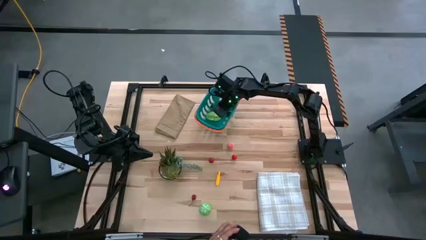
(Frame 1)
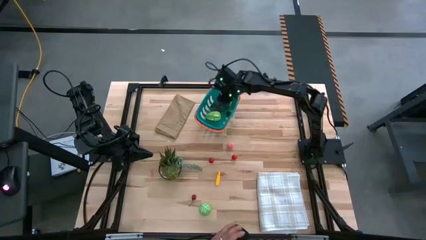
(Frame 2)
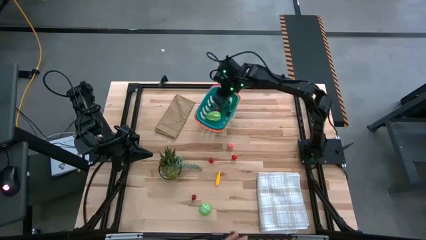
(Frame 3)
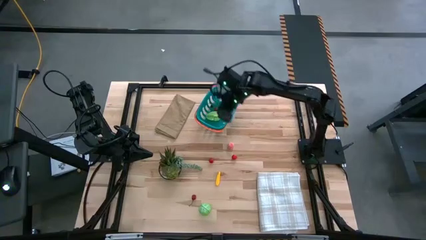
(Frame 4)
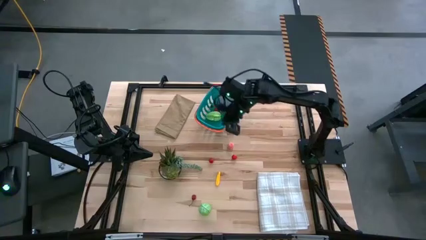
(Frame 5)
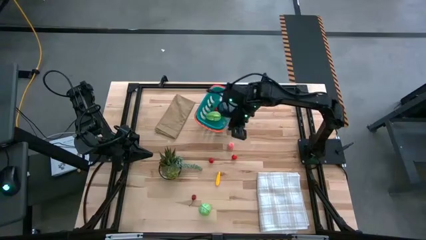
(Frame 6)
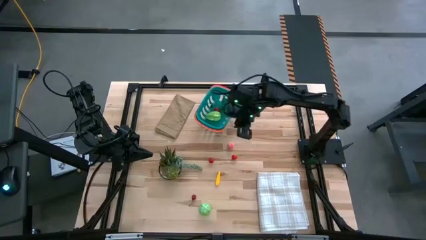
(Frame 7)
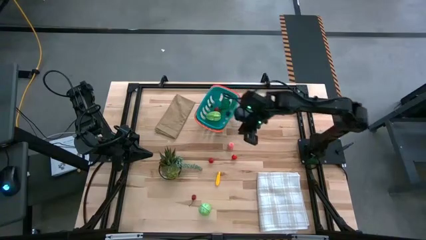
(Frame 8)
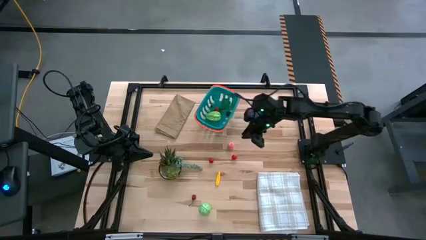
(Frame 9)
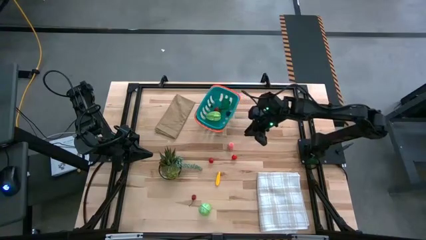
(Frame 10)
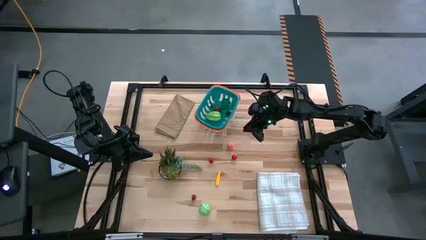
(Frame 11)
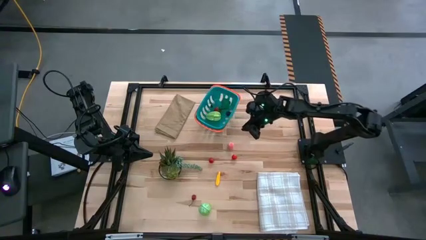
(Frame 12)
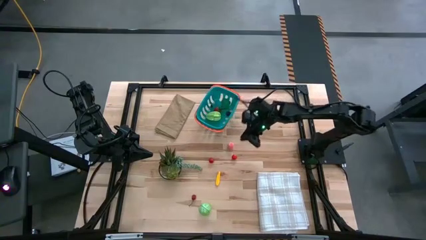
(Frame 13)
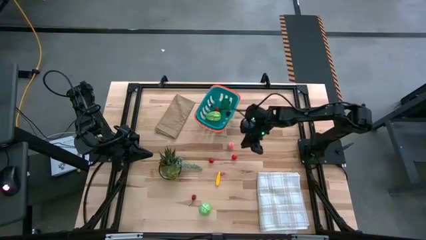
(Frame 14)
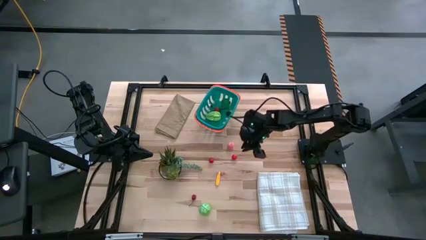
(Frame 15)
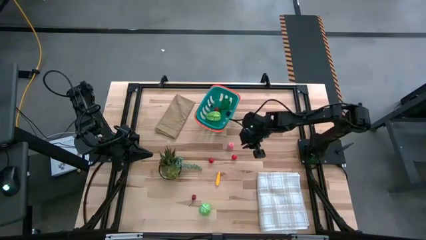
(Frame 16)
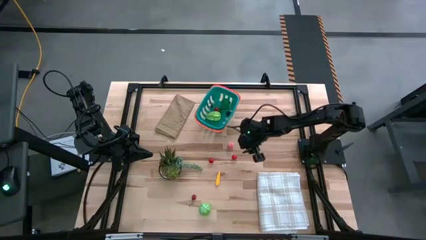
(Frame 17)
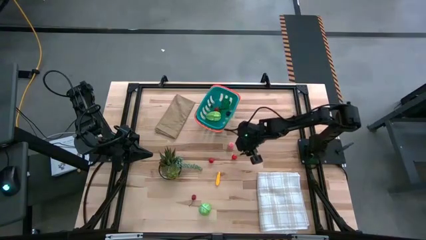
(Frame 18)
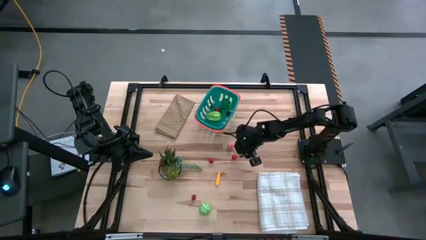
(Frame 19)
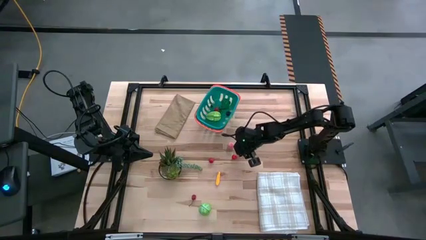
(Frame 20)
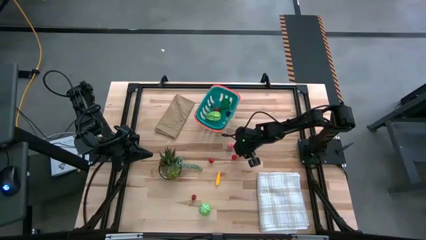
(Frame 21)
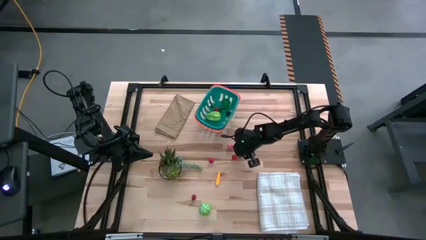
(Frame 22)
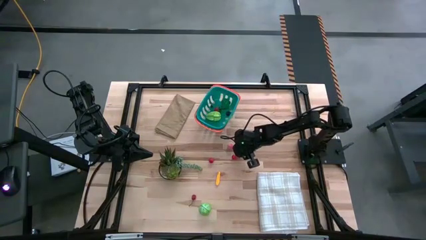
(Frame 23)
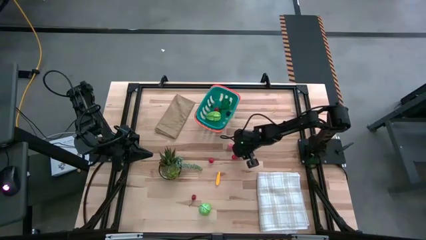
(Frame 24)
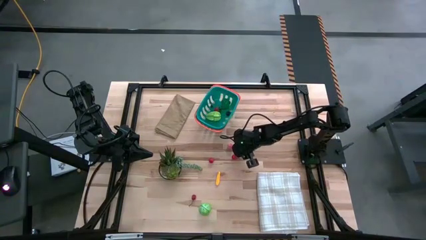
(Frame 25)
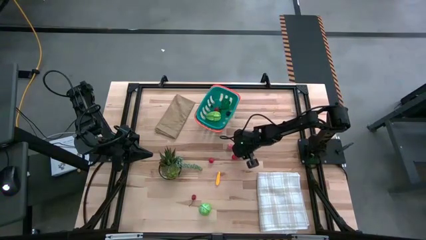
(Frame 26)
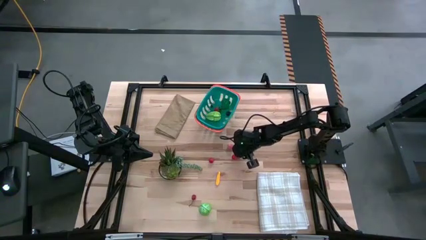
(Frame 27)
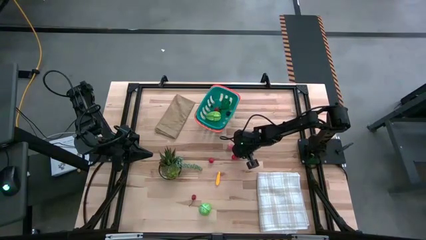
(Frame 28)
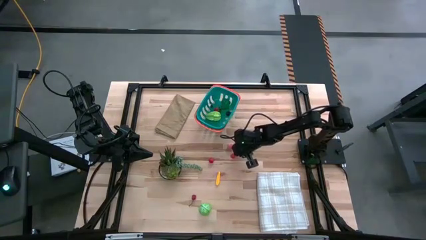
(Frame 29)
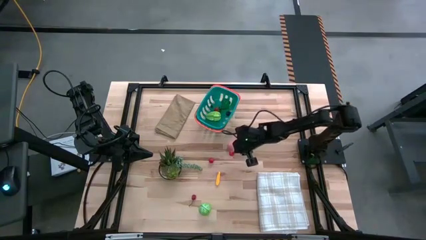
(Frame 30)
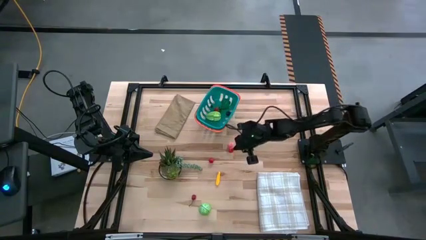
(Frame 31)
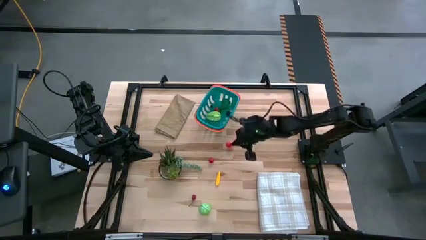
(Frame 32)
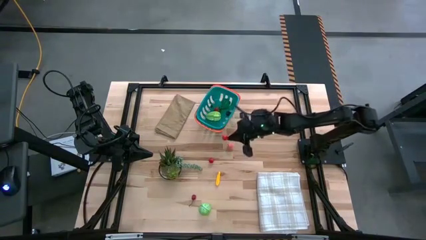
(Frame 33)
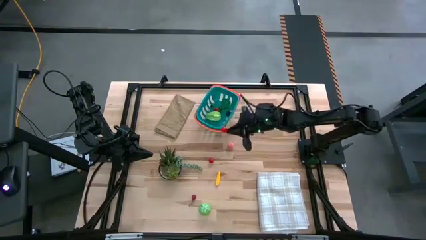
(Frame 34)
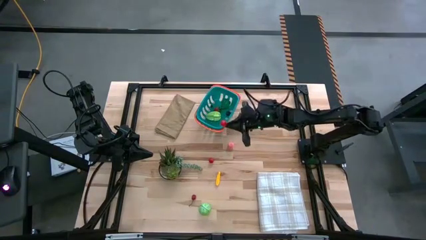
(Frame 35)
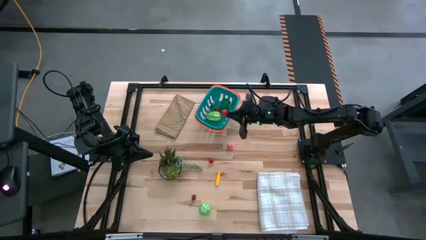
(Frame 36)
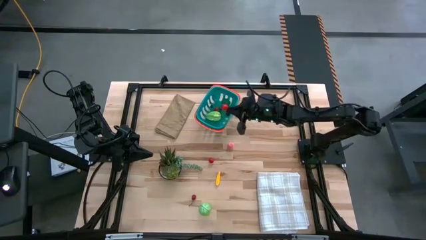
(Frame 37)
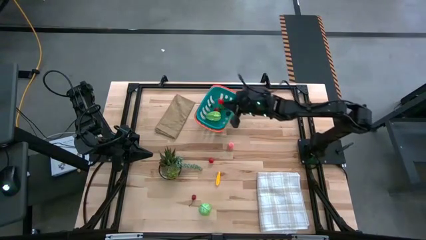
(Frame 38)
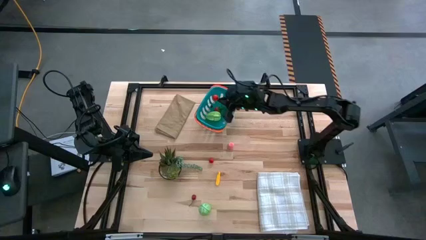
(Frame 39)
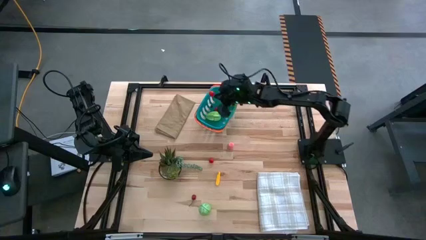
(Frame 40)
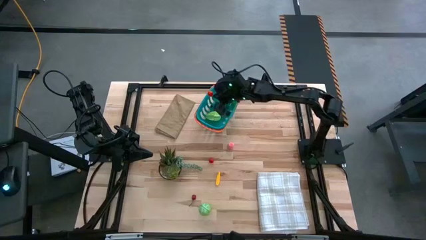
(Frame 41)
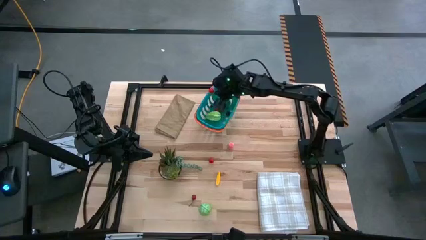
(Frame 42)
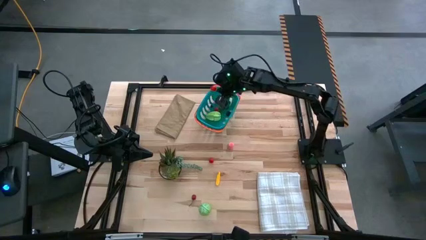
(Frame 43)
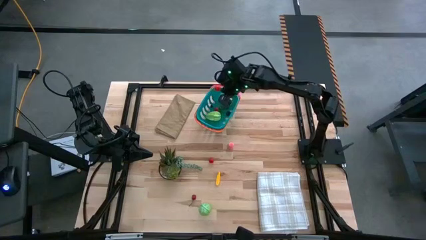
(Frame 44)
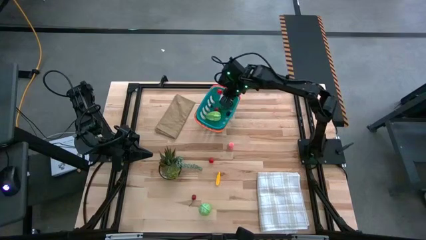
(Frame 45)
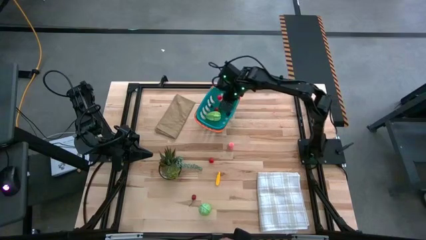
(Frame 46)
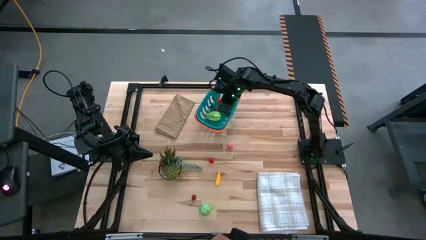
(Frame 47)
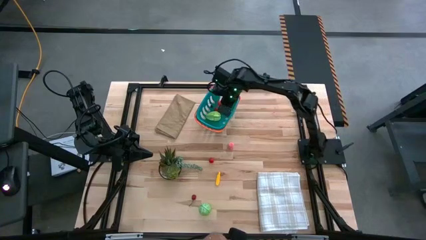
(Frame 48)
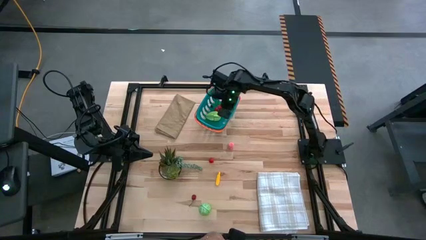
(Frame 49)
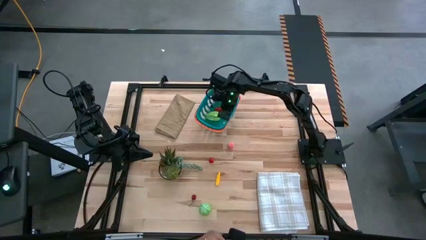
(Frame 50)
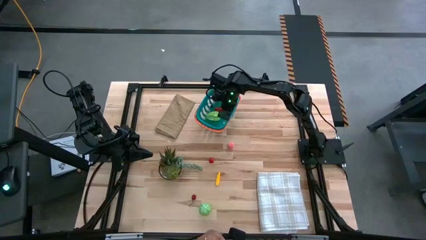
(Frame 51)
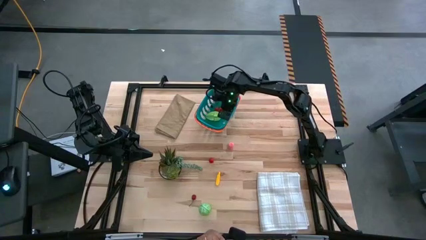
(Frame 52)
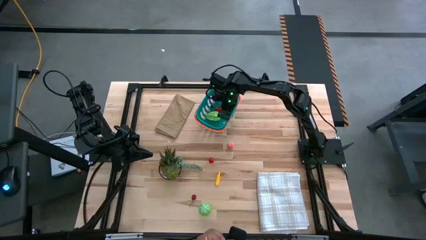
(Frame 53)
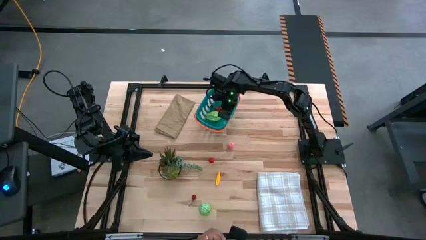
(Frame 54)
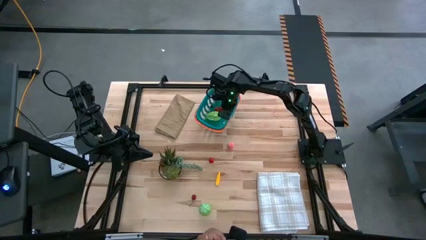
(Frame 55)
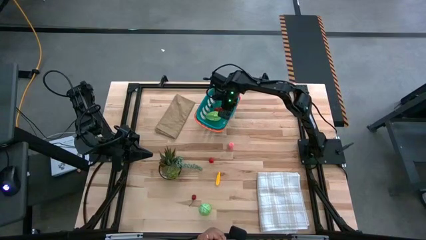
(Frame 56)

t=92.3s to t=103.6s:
Task: Pick and placing Produce into tupperware
Put the top red cherry in the green basket
